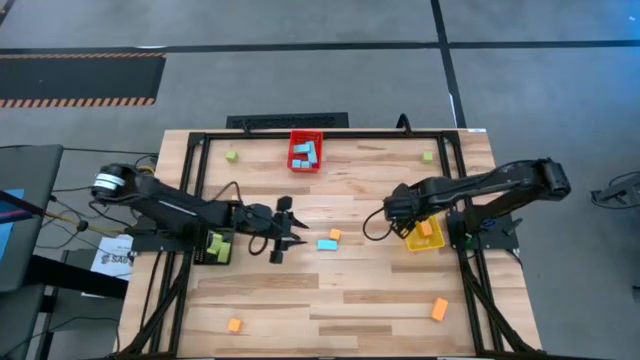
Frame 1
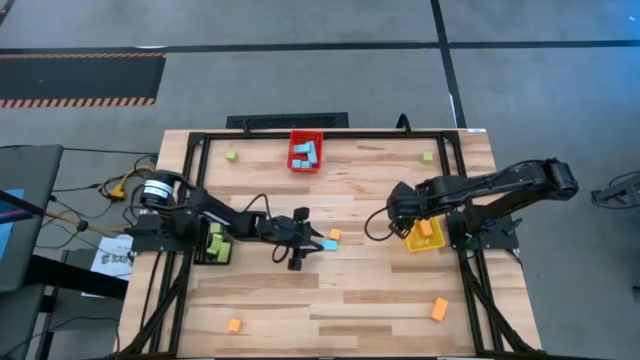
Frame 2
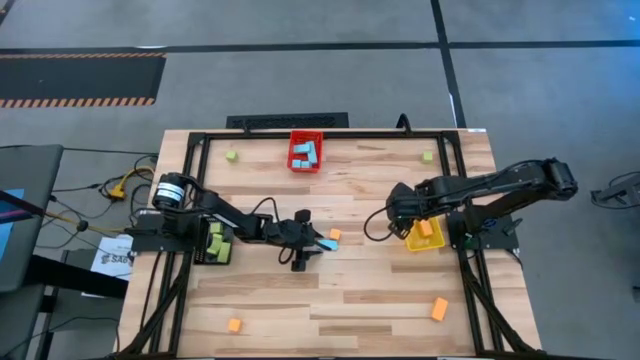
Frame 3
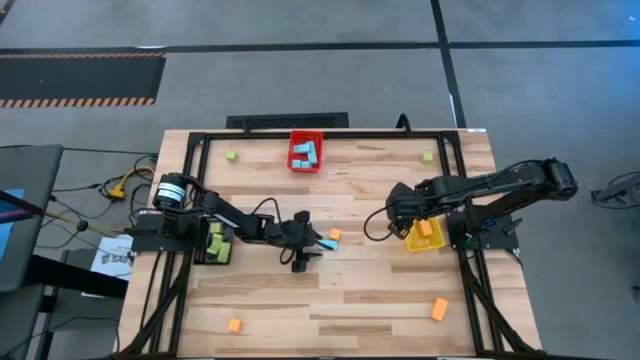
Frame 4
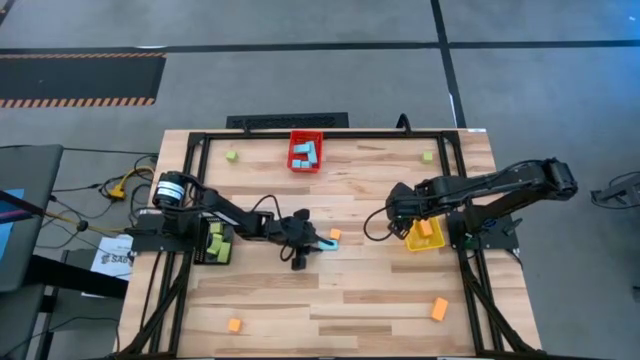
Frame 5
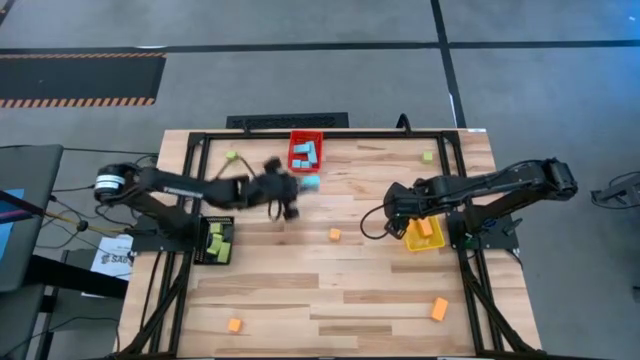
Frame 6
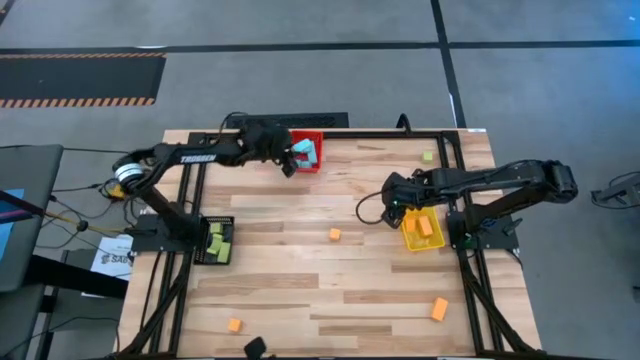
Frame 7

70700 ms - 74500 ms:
Task: Sort & place blocks by color
Put the light blue block into the red bin

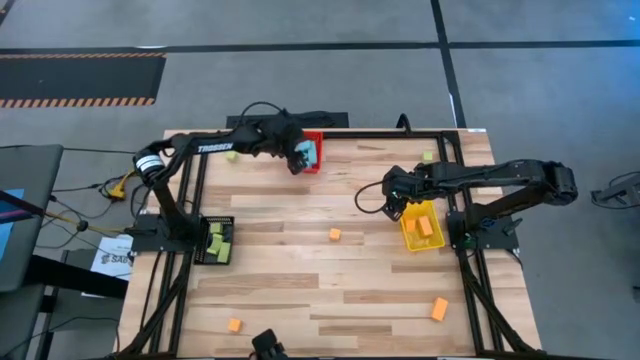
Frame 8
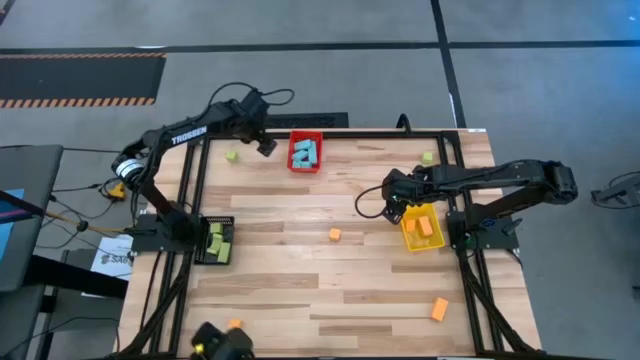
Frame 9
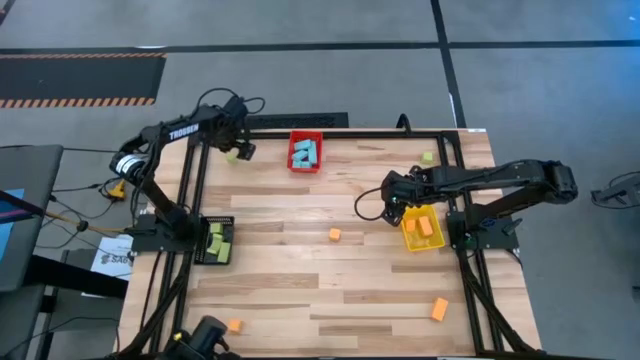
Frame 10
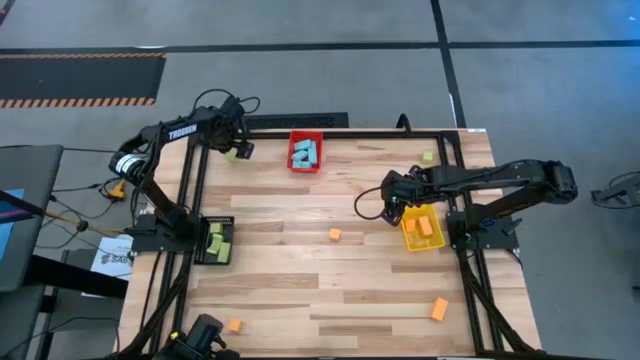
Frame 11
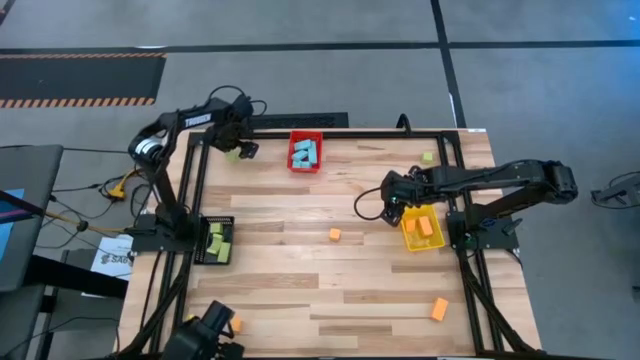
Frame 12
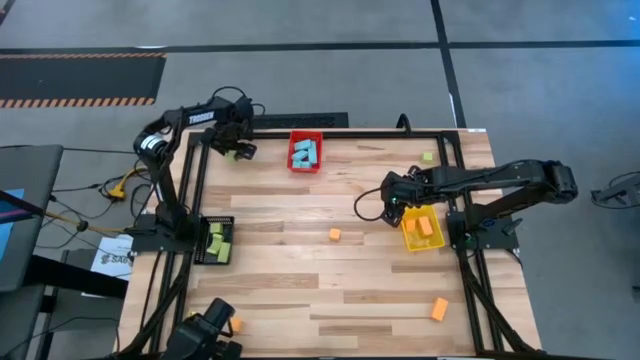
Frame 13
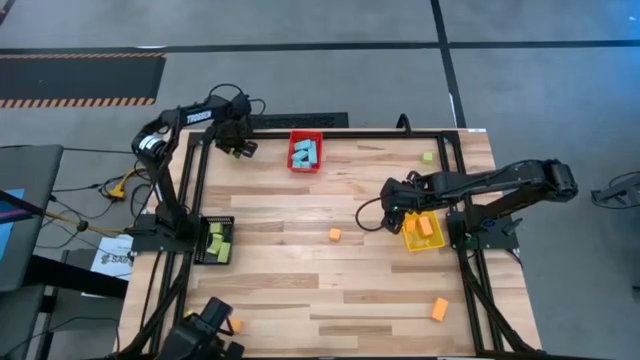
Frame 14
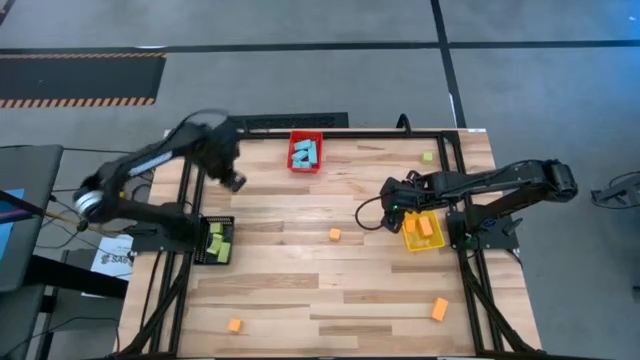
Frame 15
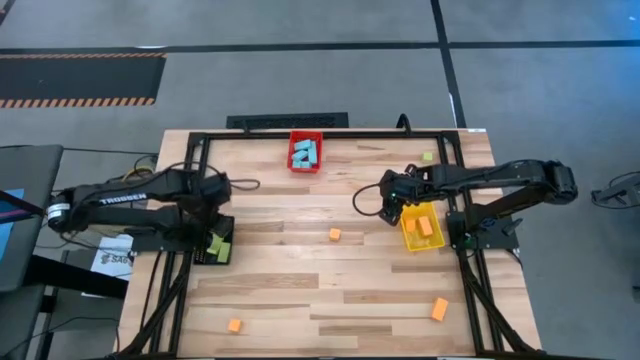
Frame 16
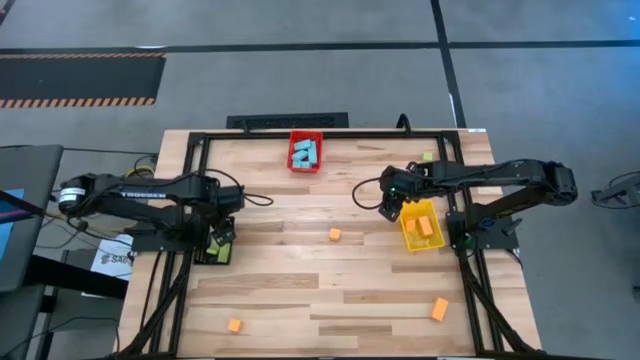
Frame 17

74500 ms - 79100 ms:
Put the light green block into the black bin

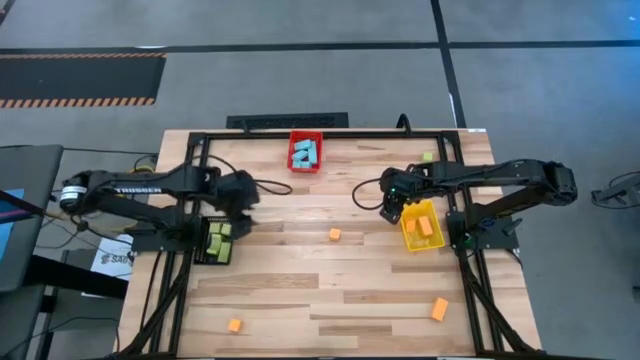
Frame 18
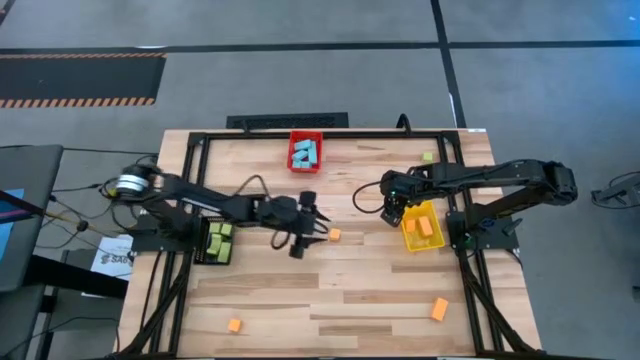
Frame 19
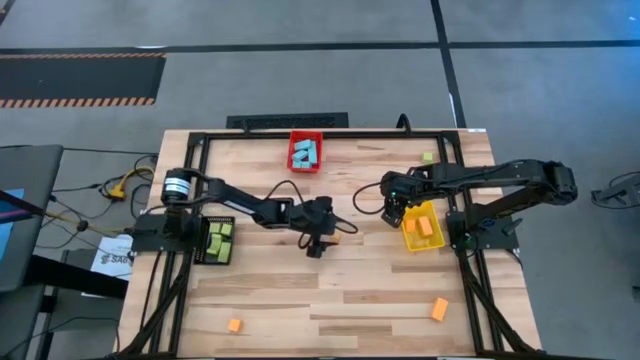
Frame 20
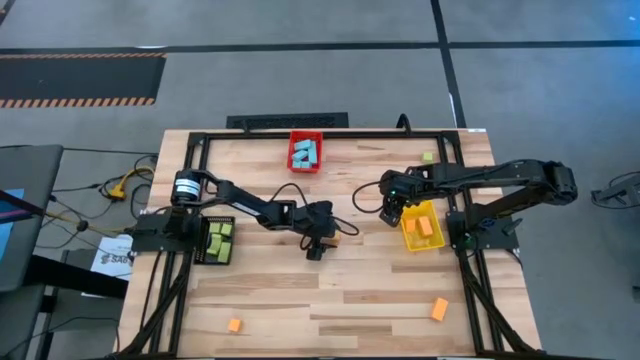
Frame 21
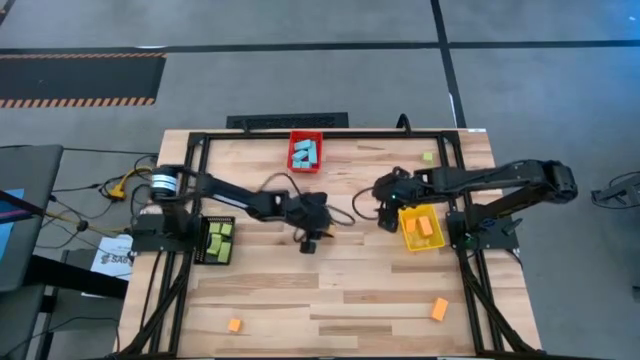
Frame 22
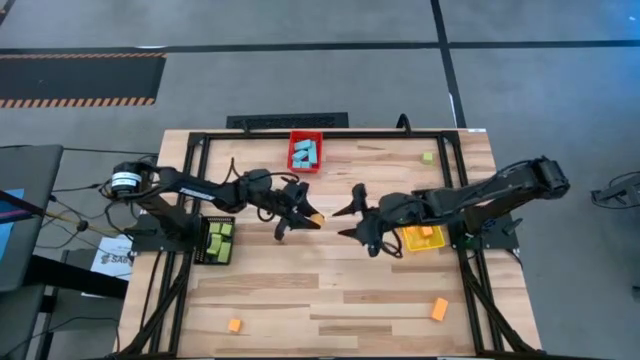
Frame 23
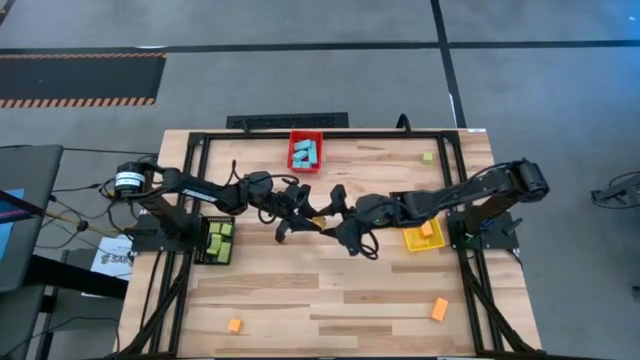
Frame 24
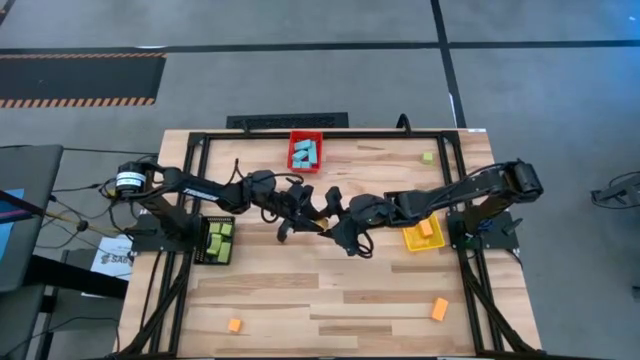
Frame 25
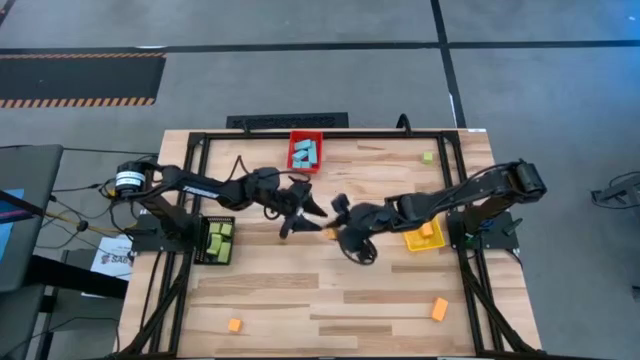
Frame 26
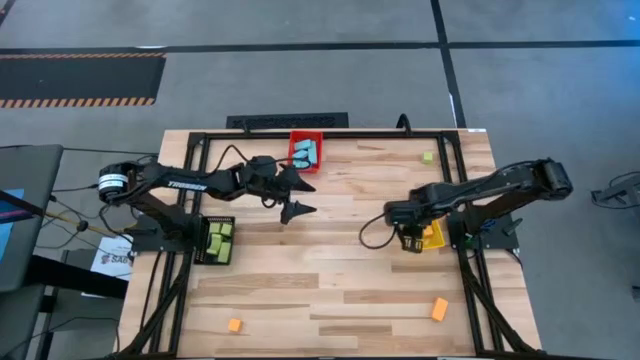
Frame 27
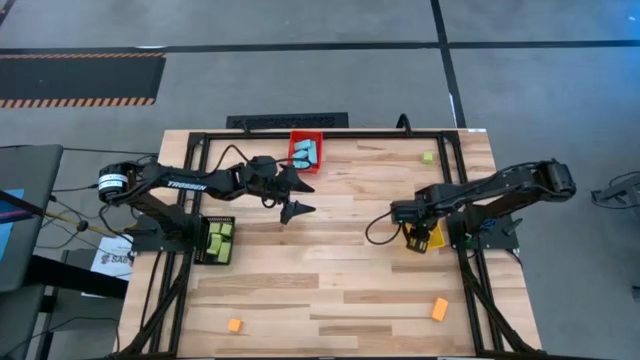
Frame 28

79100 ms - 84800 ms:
Put the yellow block into the yellow bin

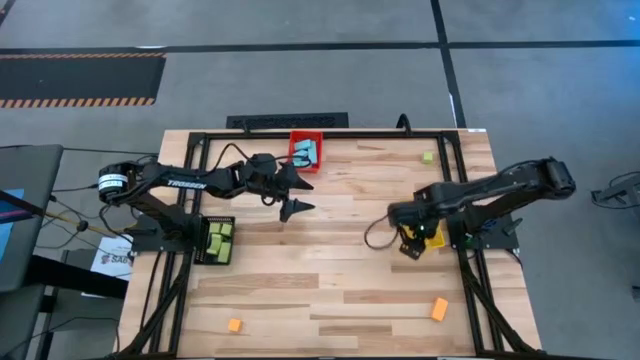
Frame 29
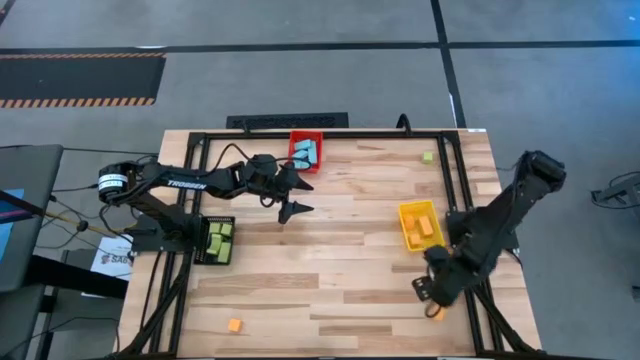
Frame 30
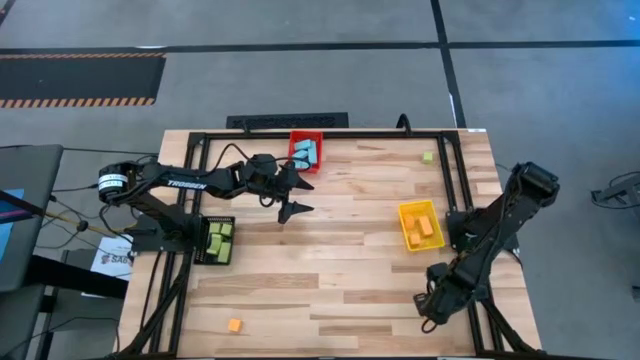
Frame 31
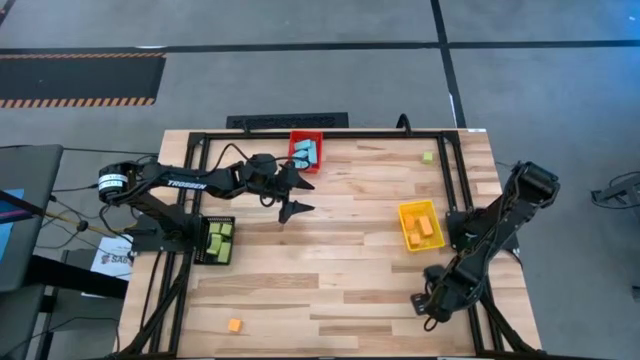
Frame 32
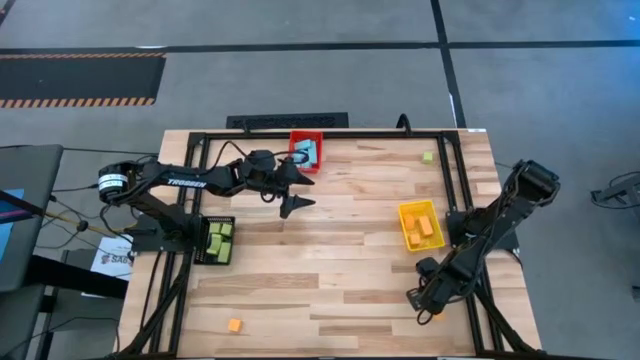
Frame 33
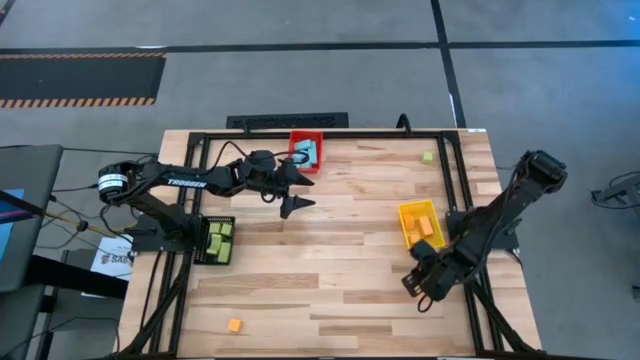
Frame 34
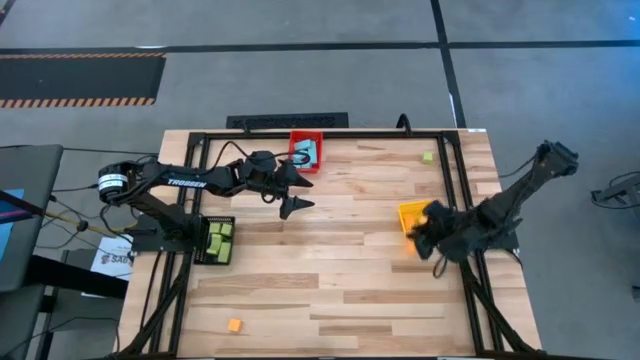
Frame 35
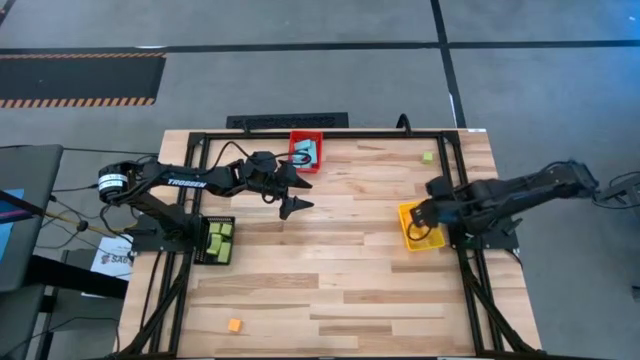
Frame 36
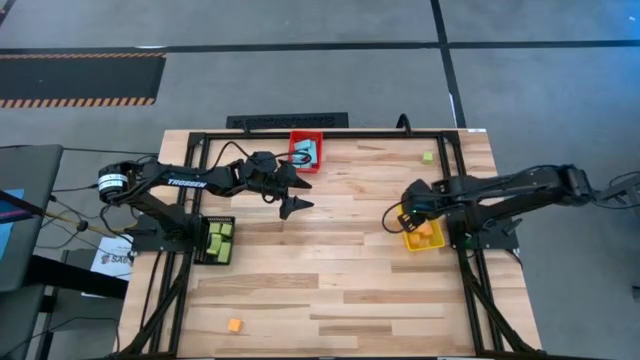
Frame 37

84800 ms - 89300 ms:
Put the yellow block into the yellow bin

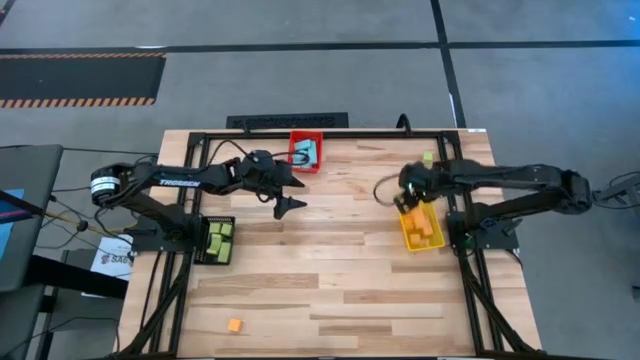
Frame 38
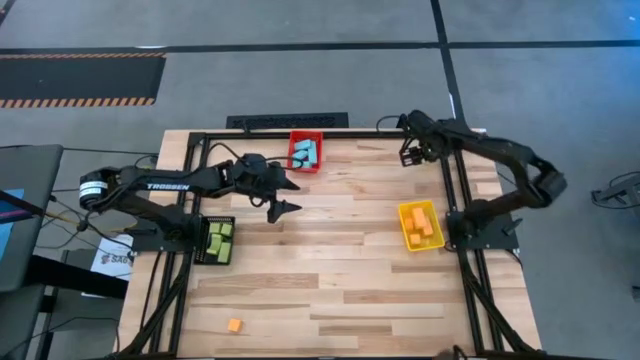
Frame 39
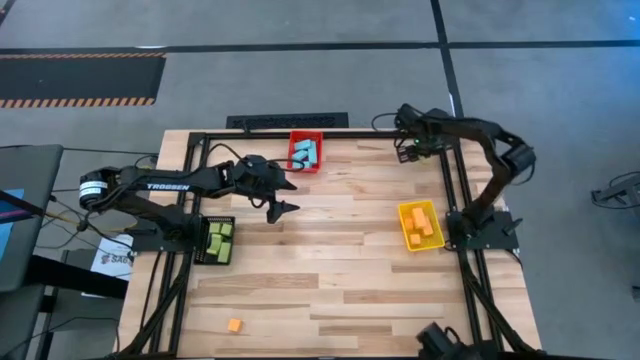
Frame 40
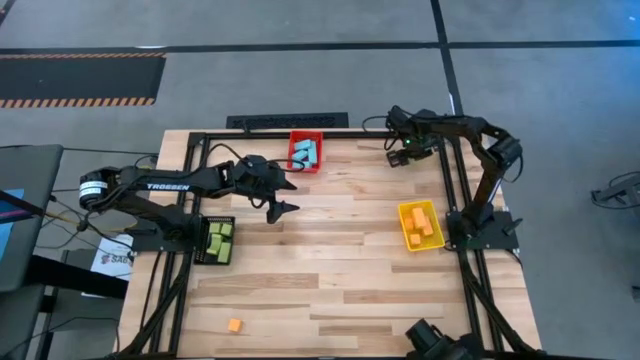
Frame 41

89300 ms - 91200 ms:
Put the light green block into the black bin

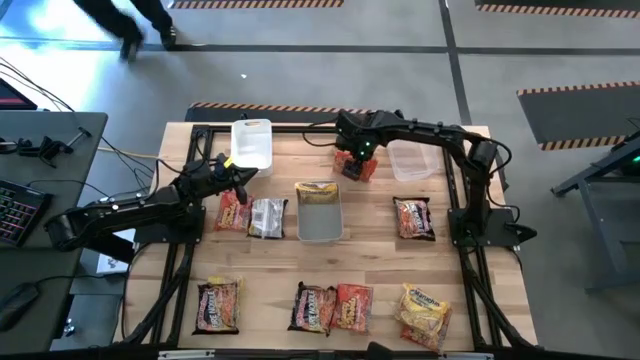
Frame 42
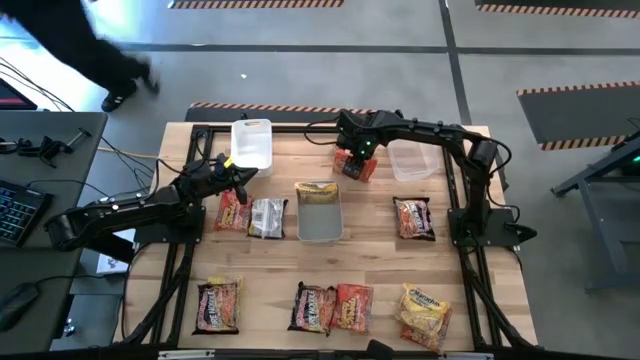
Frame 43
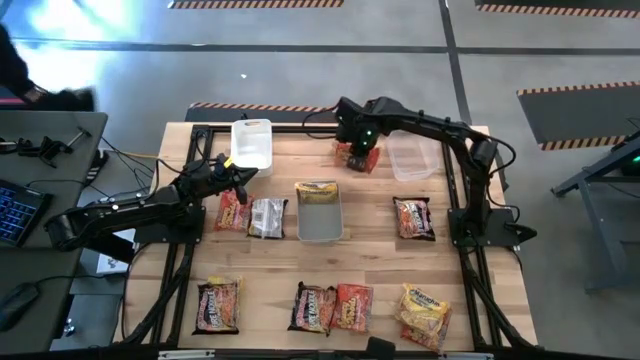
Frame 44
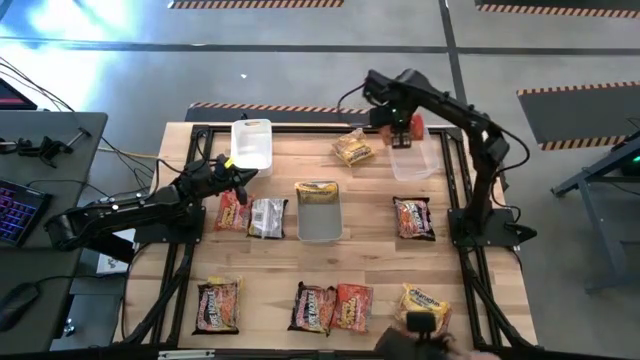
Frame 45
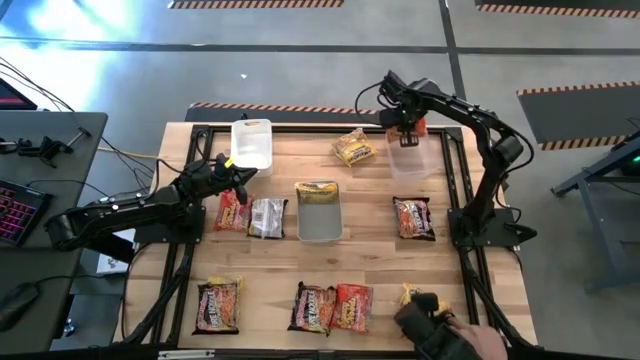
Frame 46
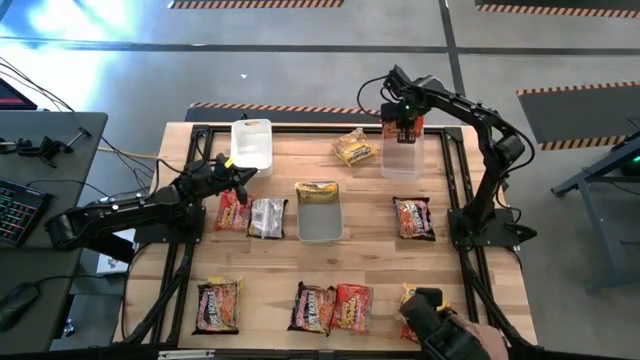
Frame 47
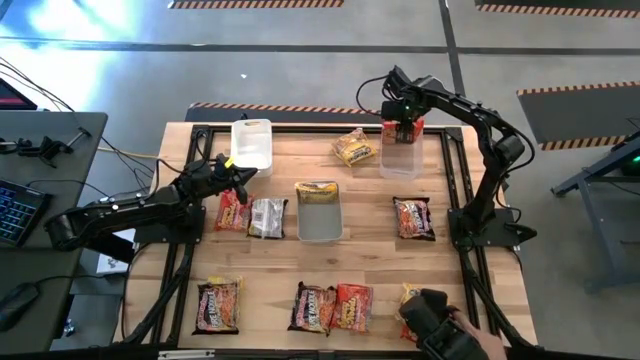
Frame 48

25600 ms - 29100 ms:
Task: Sort Maruchan noodles
Put the orange noodle pack into the transparent bin
